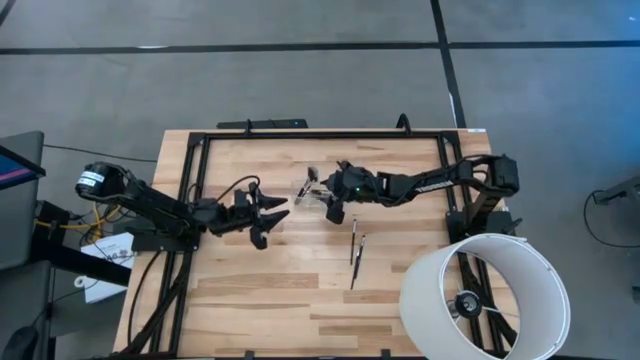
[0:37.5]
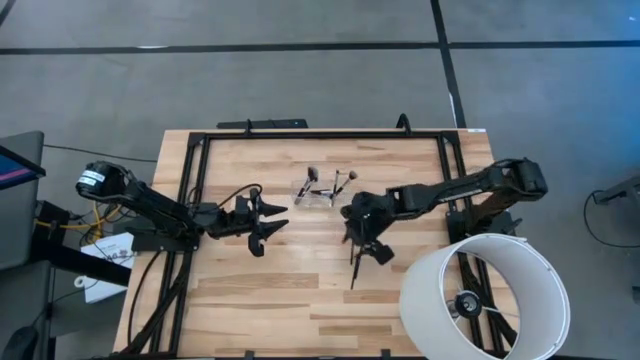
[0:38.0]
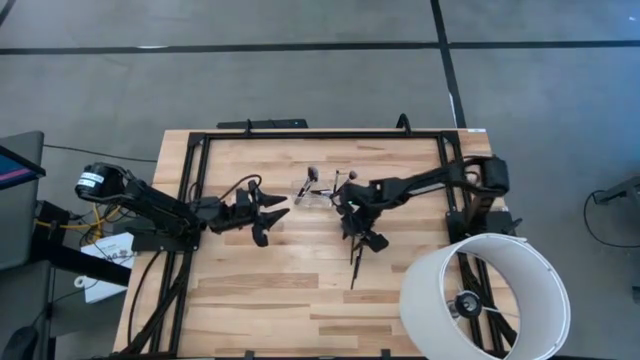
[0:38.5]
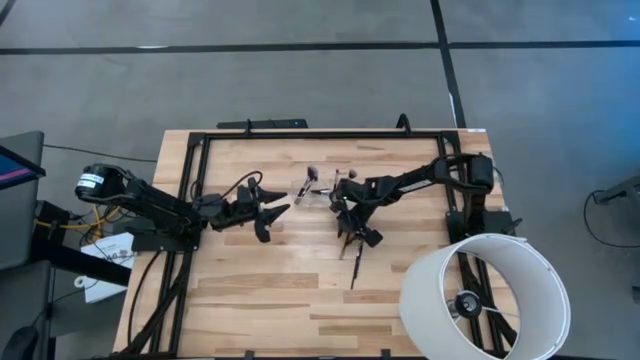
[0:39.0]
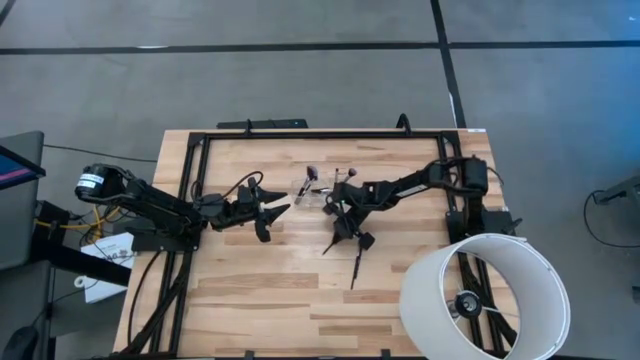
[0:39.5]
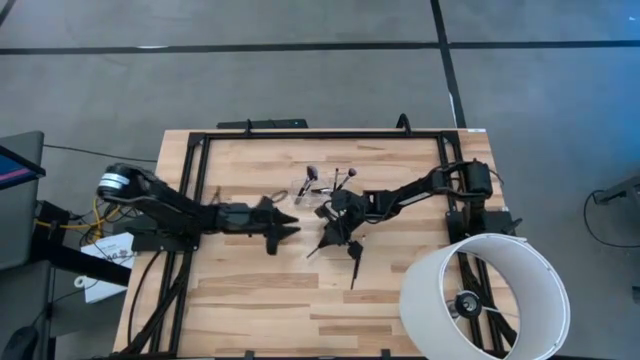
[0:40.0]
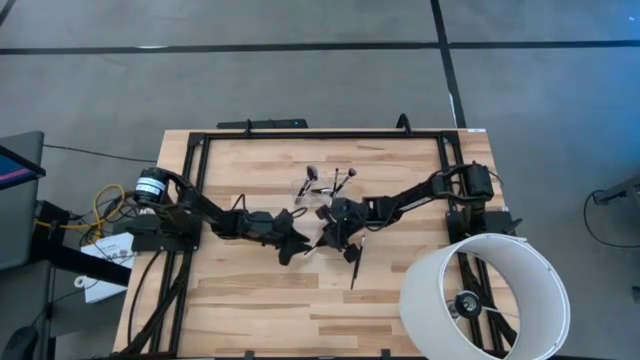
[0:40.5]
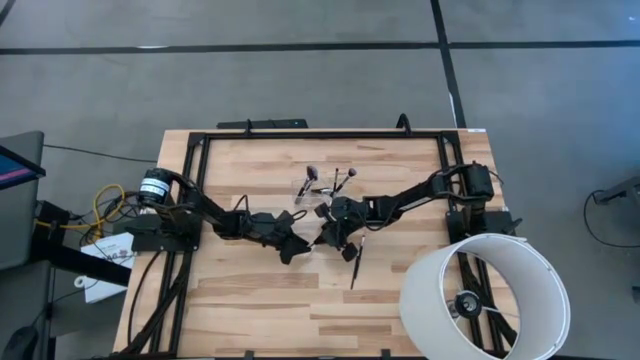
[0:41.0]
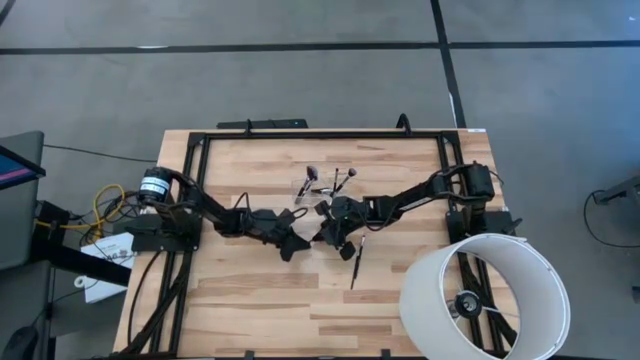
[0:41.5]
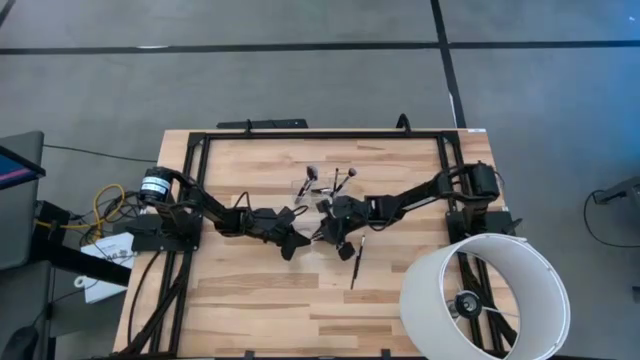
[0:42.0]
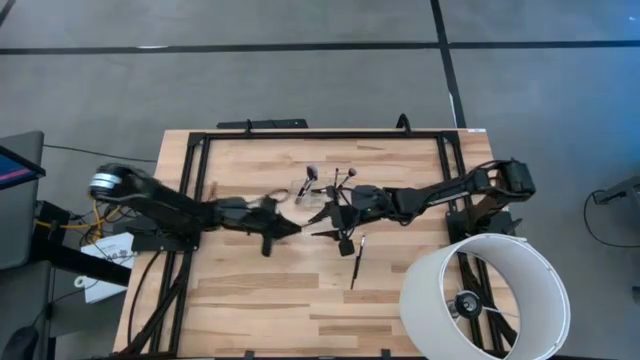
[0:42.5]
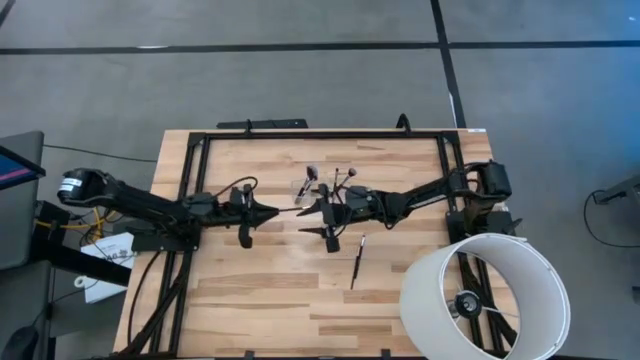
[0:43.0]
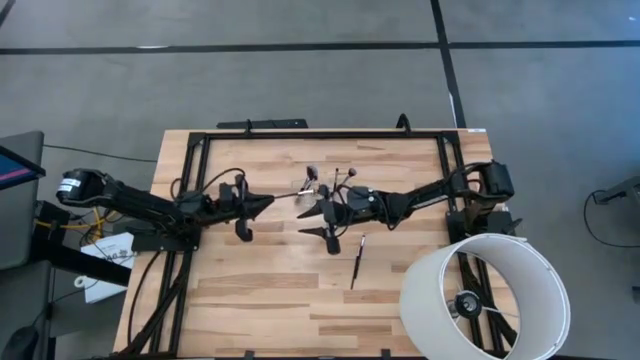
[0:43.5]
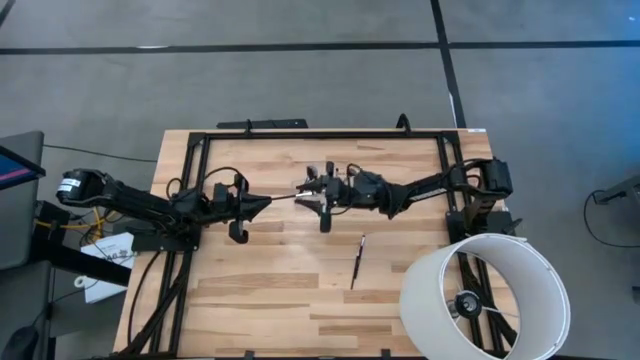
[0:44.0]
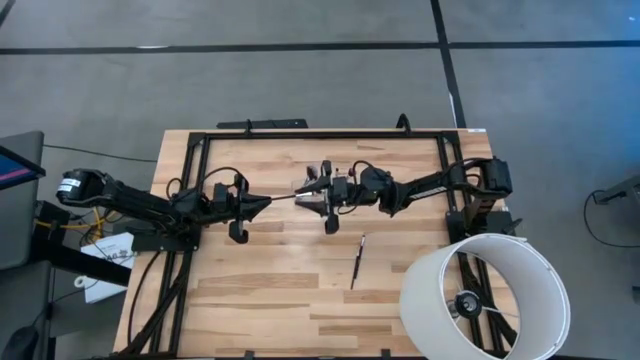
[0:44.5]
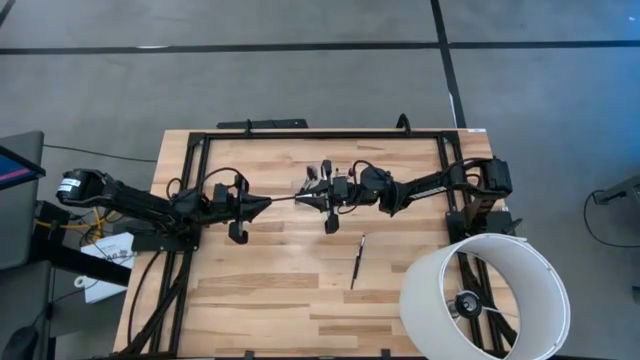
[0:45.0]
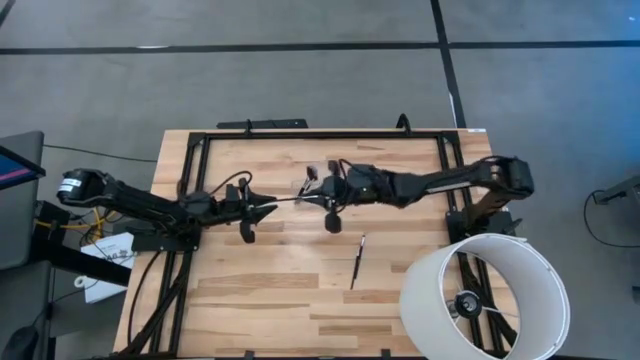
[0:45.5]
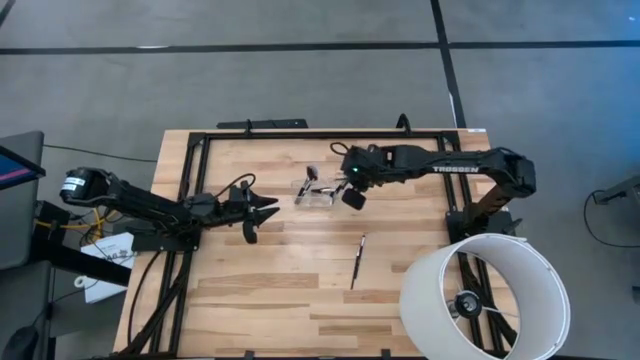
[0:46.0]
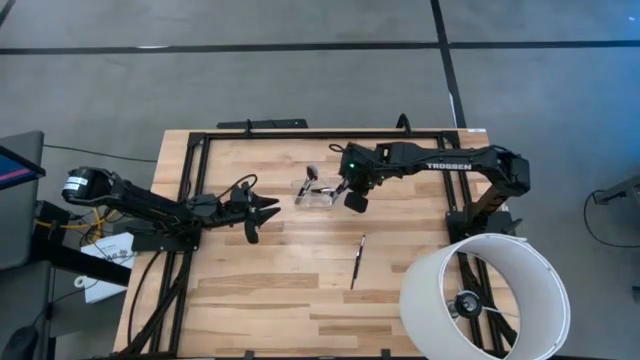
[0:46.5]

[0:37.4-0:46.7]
Task: Put items in baskets/containers
Put the eyeshadow brush into the transparent organizer

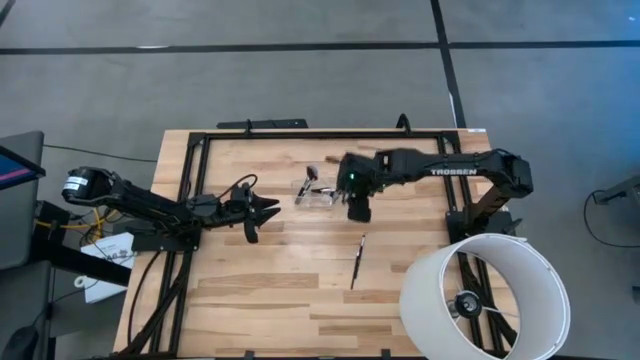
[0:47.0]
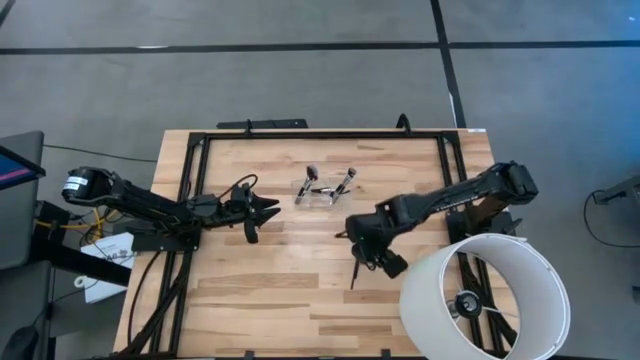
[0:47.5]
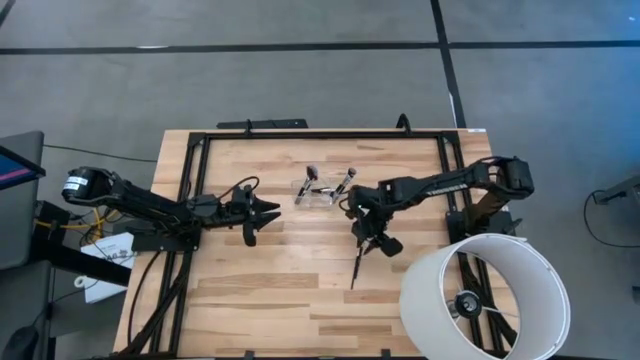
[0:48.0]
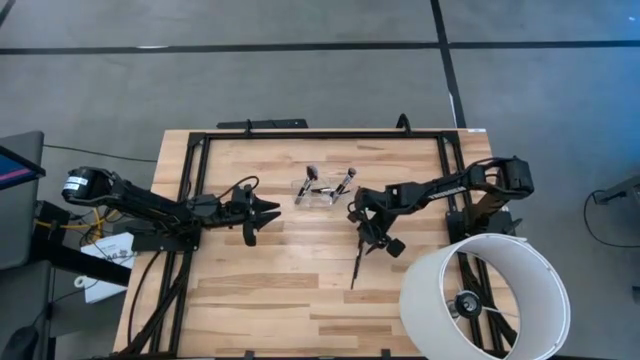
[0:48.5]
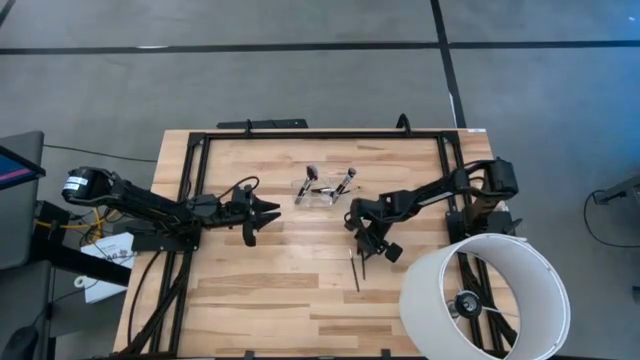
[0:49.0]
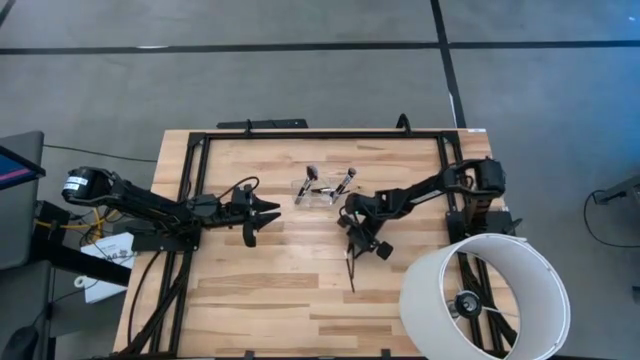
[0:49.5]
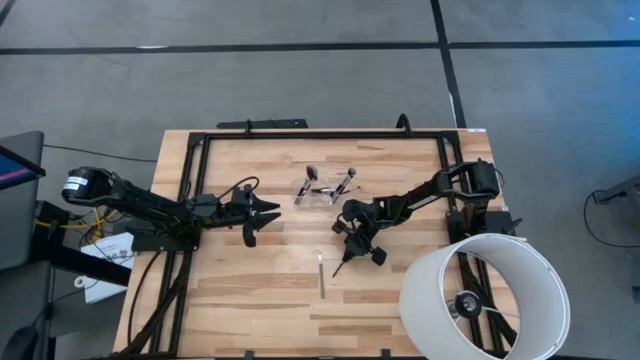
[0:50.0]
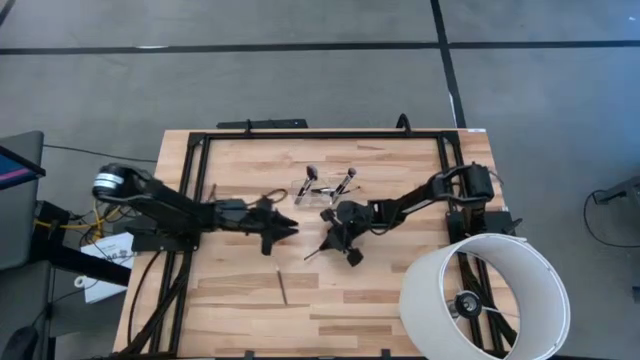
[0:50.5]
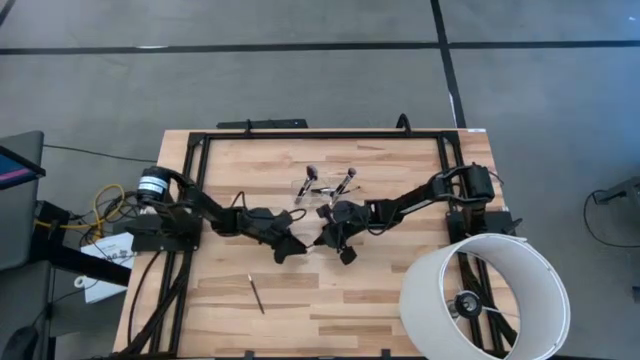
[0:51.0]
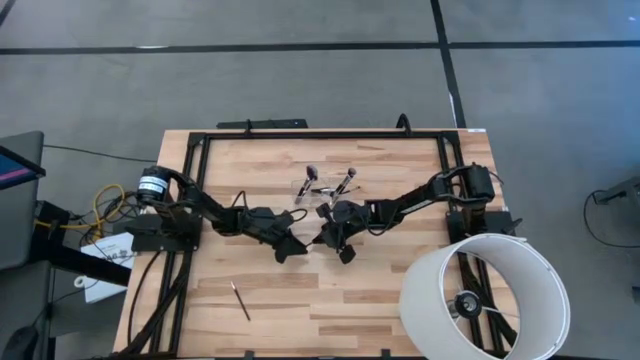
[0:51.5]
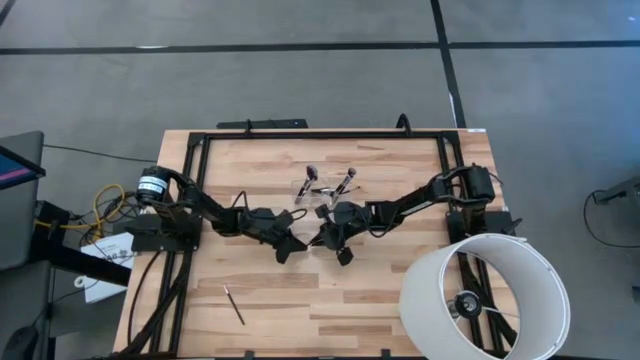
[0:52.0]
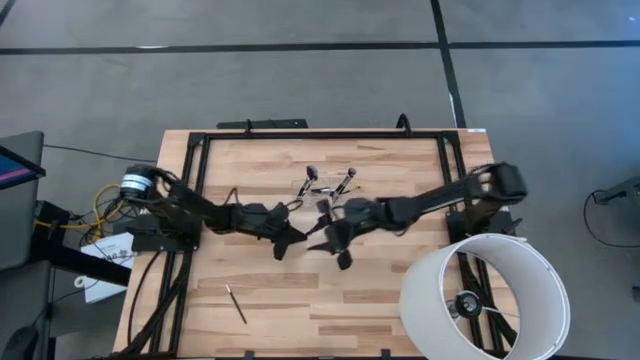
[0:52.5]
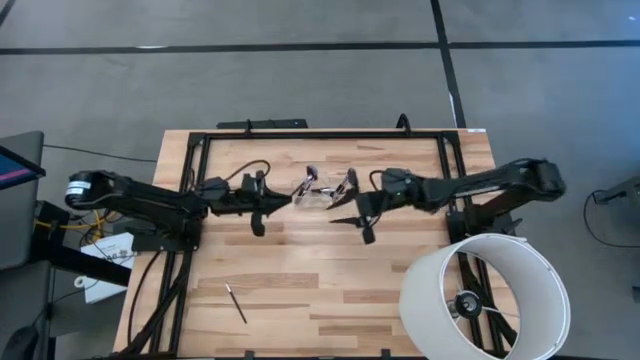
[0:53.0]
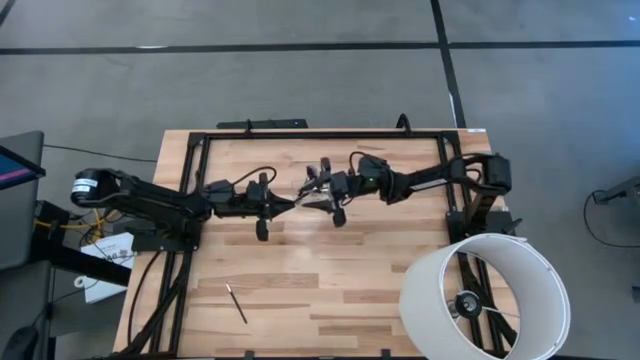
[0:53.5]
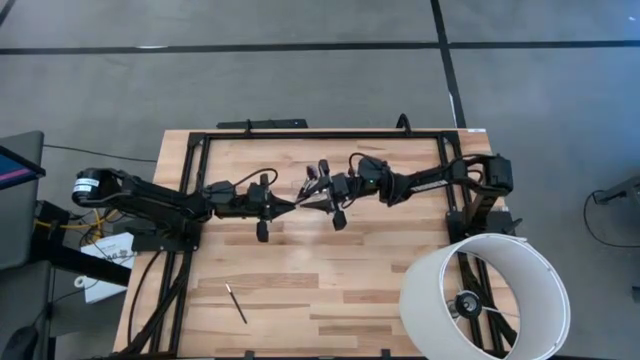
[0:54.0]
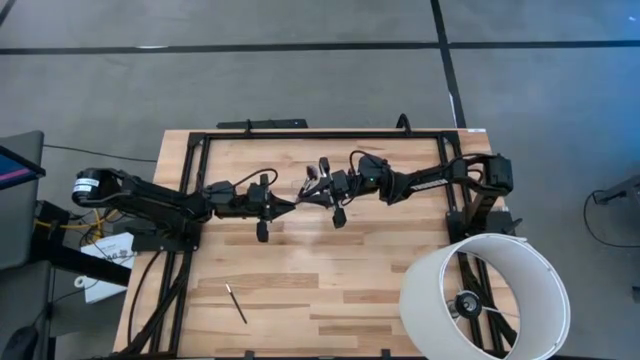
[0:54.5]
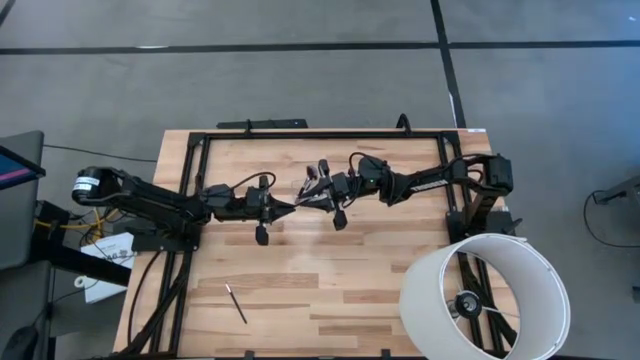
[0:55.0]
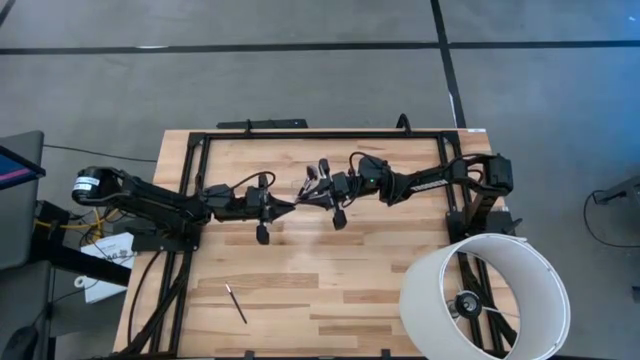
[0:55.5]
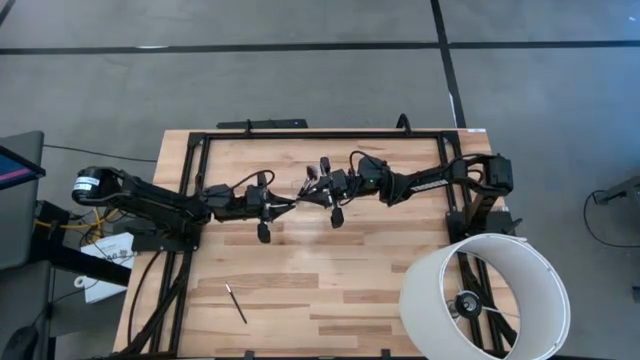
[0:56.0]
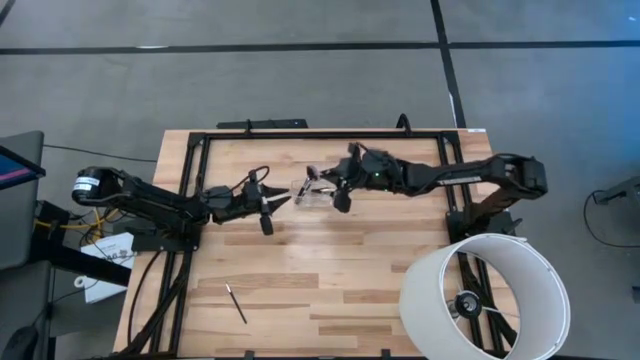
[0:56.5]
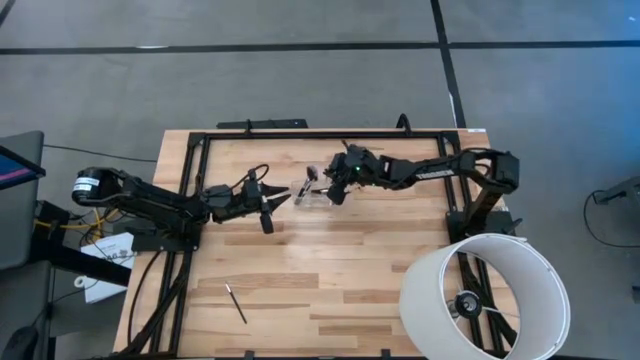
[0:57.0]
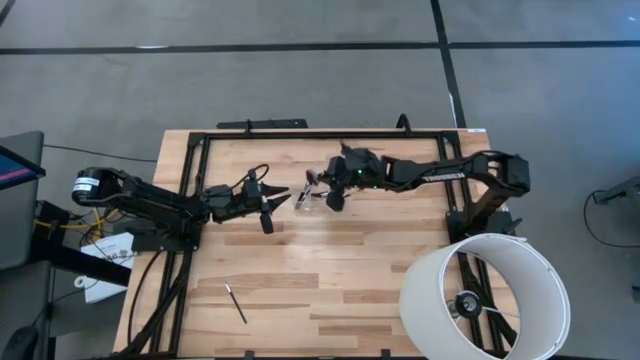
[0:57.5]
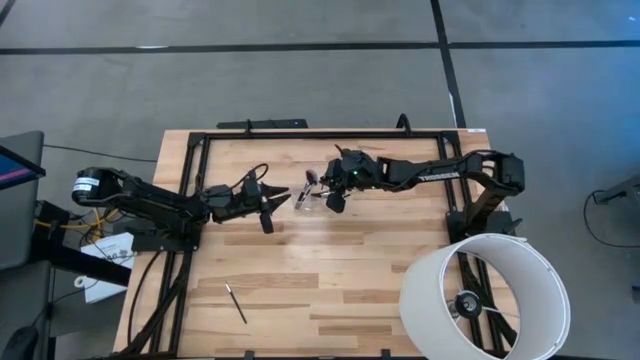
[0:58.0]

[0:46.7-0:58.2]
Put the eyeshadow brush into the transparent organizer
